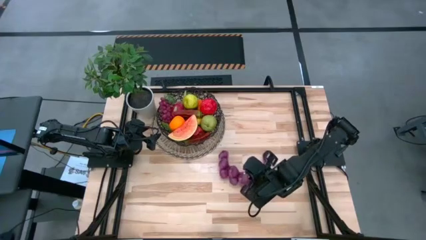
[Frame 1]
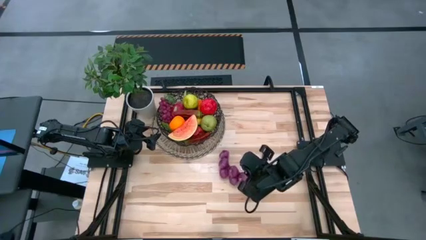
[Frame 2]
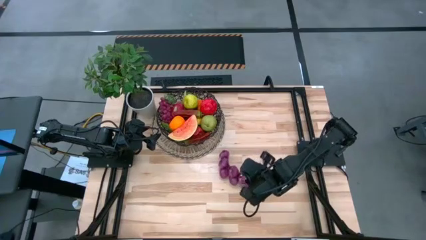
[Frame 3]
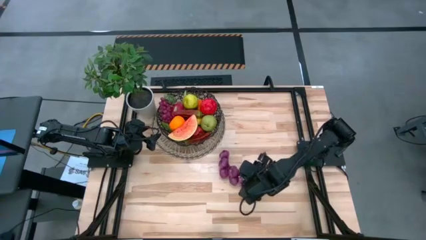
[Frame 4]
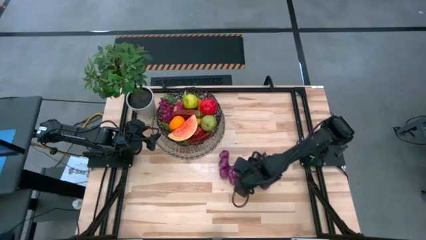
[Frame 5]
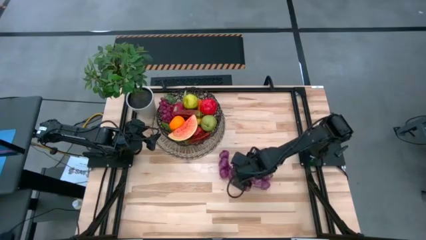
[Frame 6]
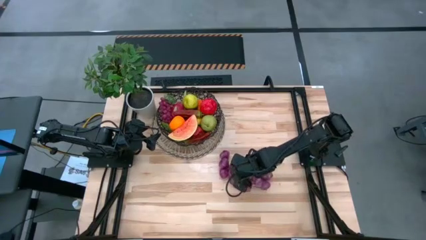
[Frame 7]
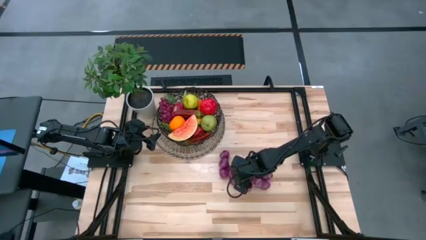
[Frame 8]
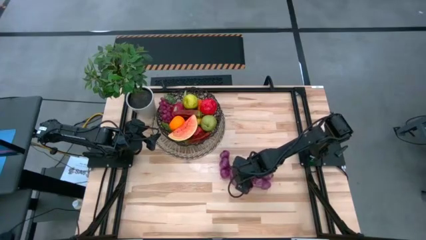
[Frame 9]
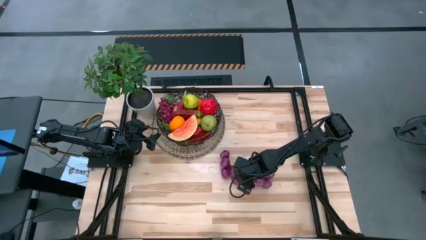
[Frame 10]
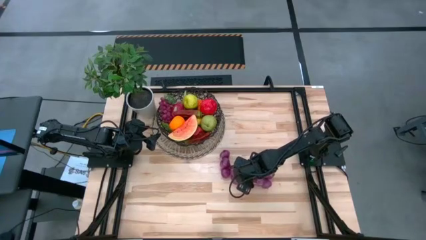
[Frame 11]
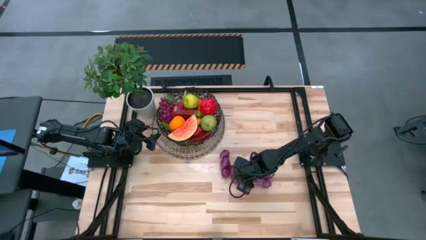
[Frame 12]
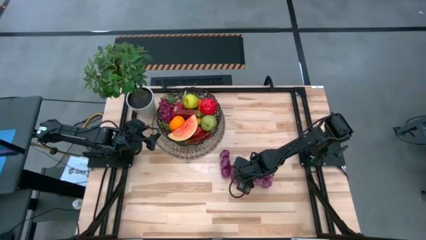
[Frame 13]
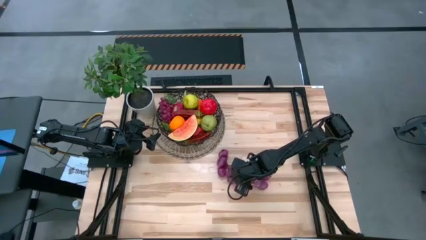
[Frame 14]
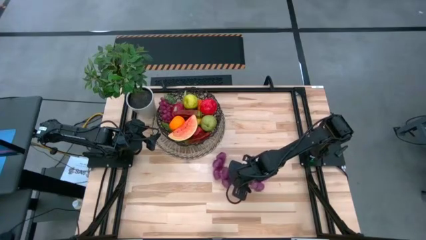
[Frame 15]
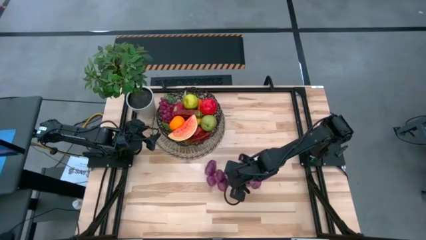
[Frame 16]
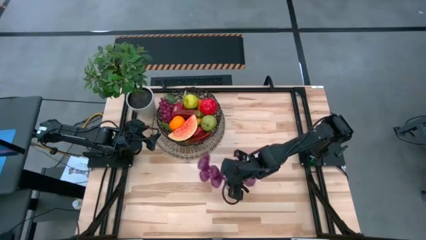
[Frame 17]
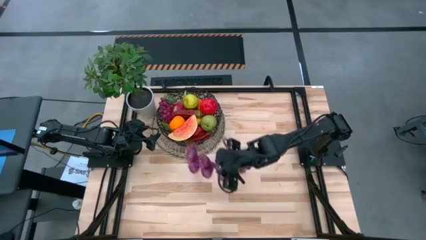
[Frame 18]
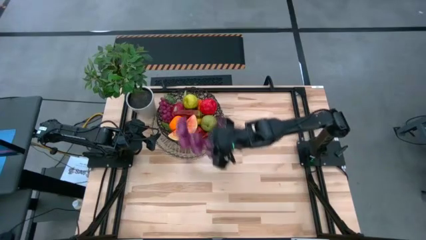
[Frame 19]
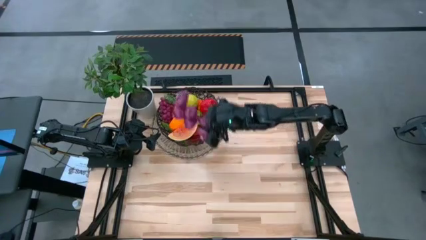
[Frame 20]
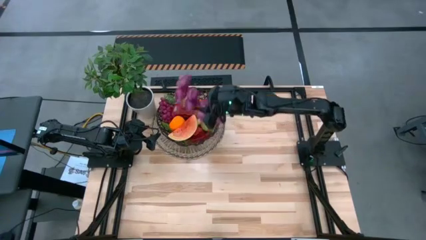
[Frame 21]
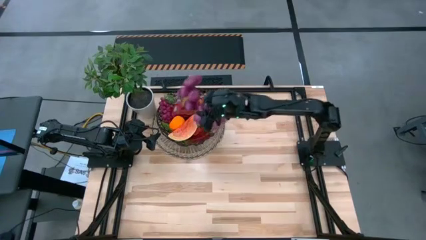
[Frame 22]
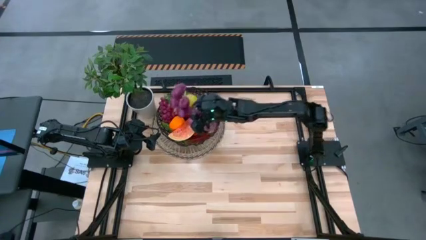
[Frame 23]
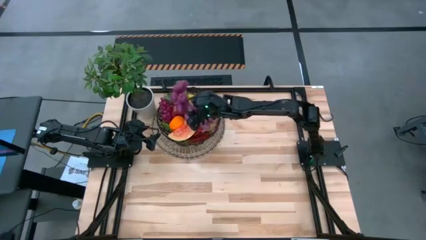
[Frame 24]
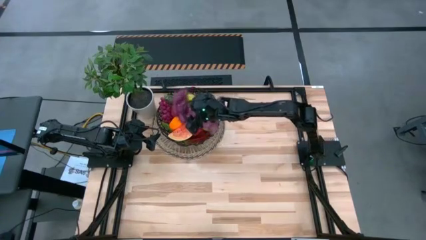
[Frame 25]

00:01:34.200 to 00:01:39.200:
Task: Build produce basket
Put the purple garlic into the wire basket

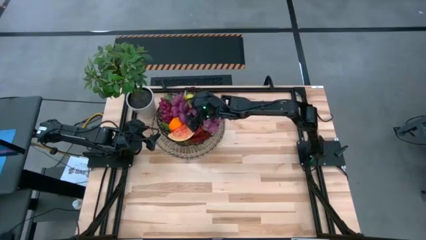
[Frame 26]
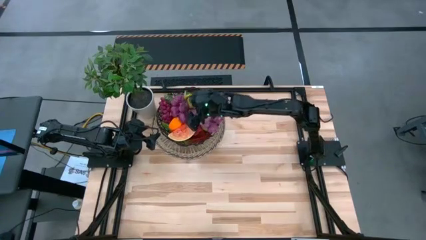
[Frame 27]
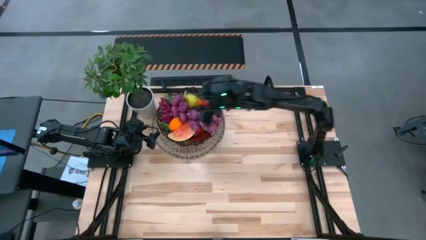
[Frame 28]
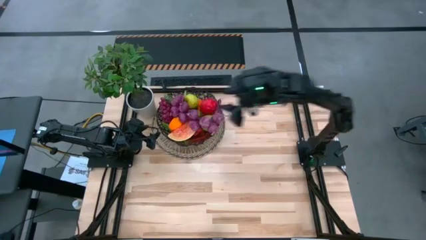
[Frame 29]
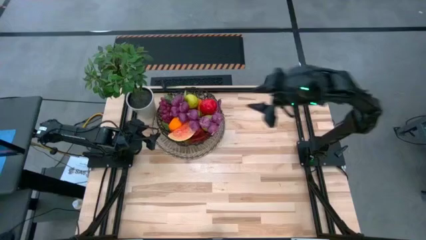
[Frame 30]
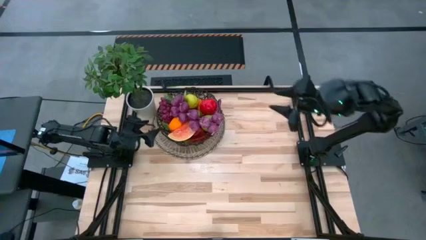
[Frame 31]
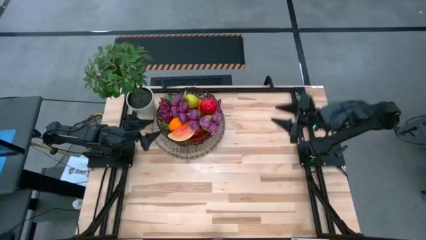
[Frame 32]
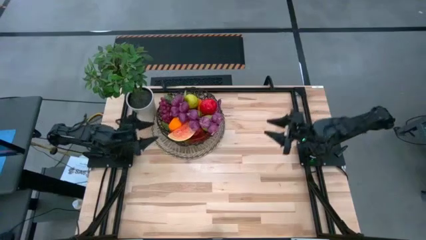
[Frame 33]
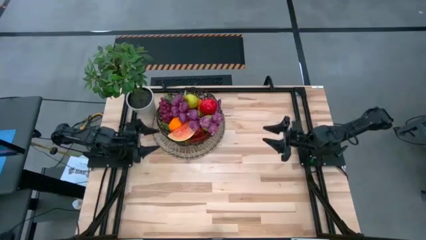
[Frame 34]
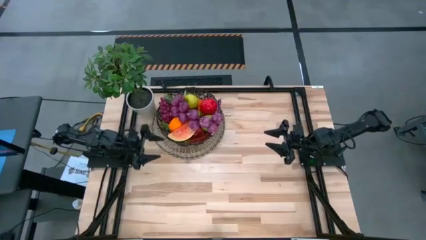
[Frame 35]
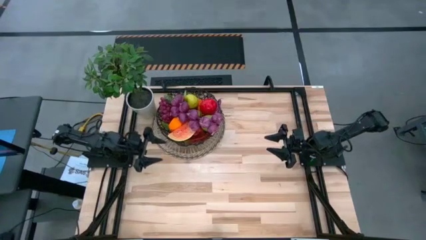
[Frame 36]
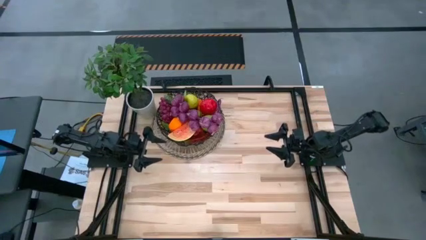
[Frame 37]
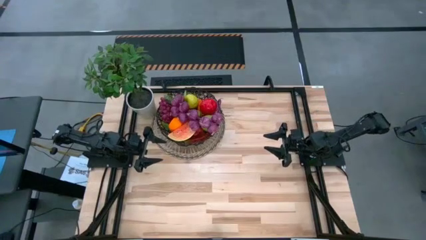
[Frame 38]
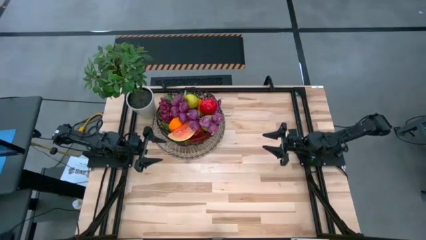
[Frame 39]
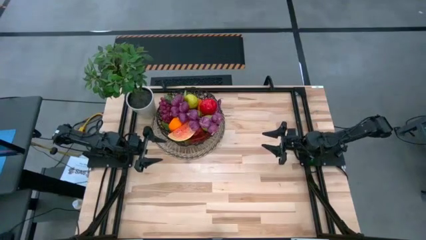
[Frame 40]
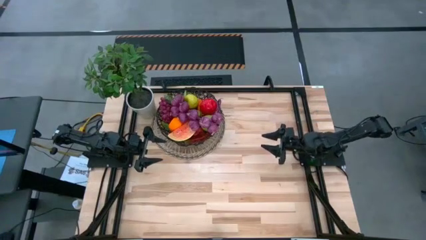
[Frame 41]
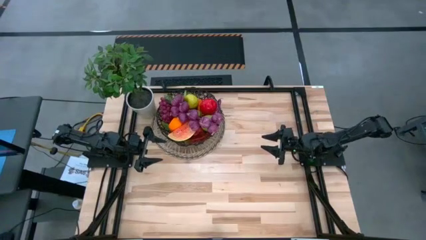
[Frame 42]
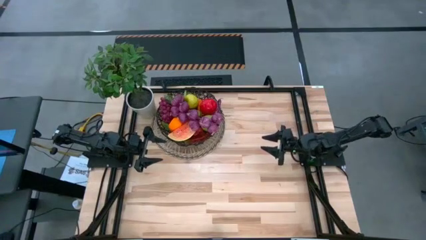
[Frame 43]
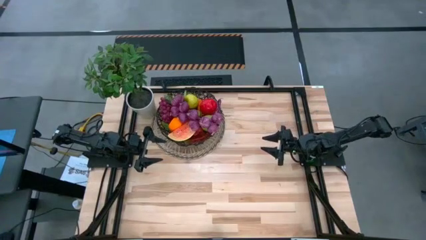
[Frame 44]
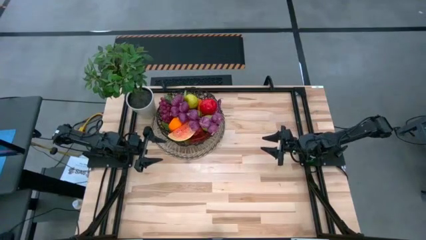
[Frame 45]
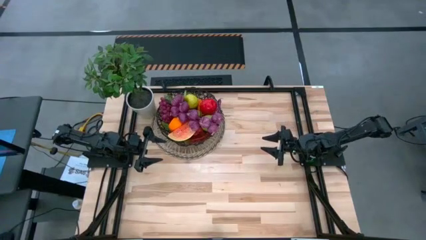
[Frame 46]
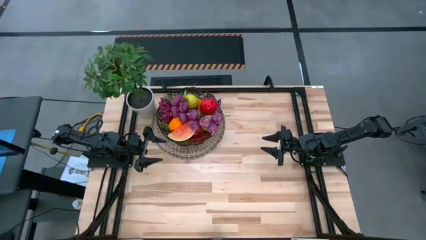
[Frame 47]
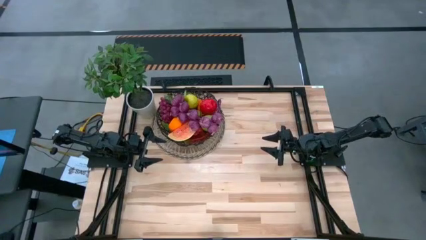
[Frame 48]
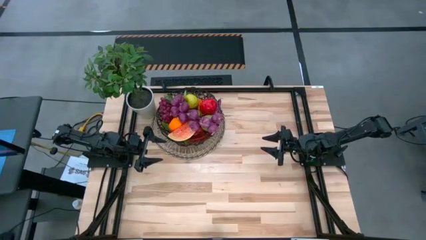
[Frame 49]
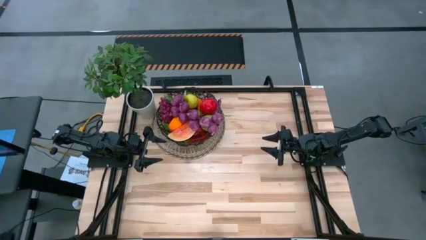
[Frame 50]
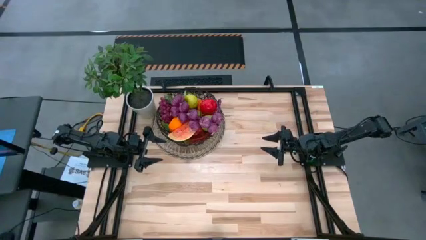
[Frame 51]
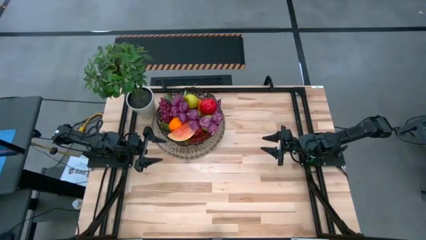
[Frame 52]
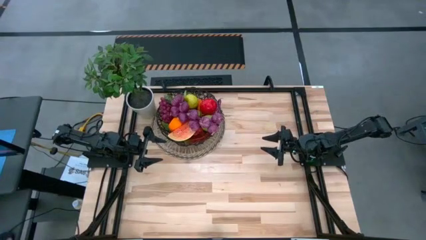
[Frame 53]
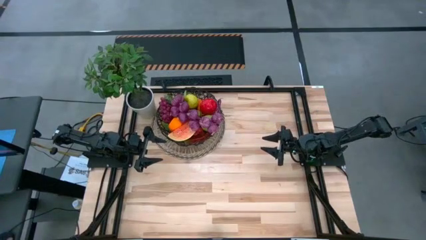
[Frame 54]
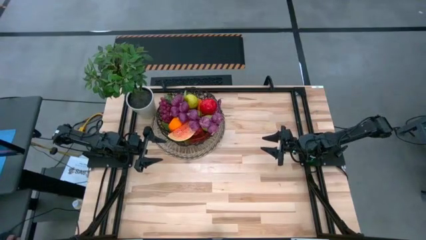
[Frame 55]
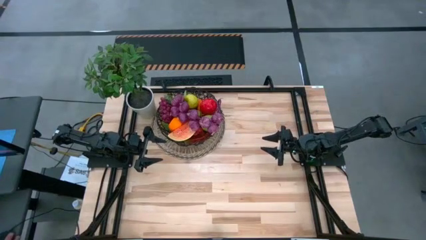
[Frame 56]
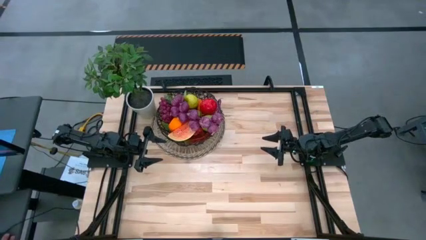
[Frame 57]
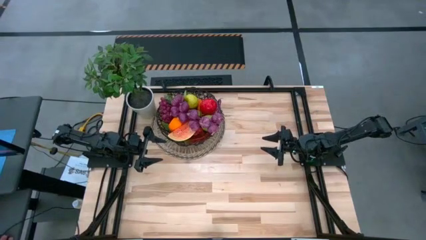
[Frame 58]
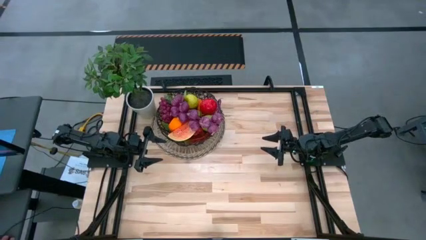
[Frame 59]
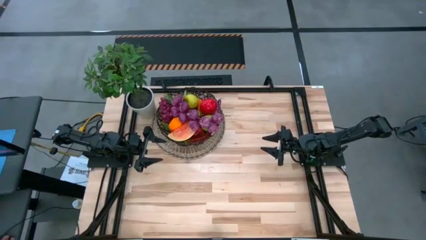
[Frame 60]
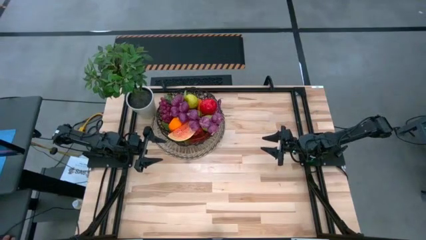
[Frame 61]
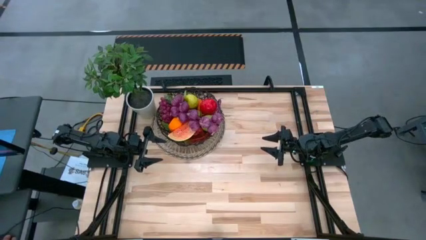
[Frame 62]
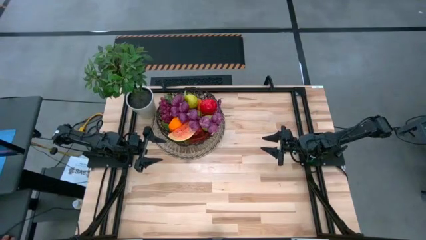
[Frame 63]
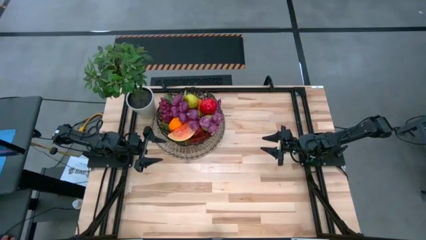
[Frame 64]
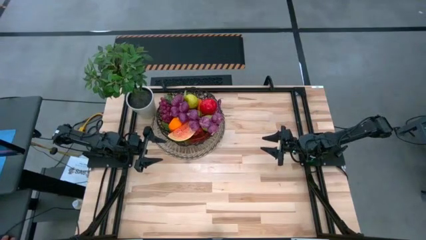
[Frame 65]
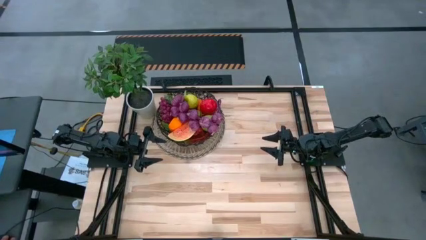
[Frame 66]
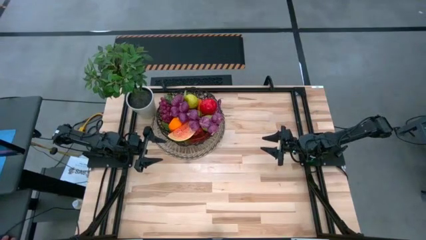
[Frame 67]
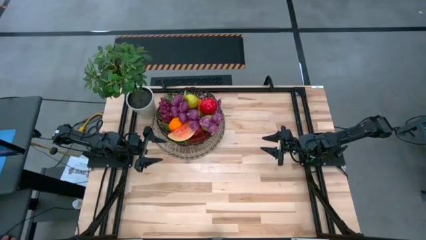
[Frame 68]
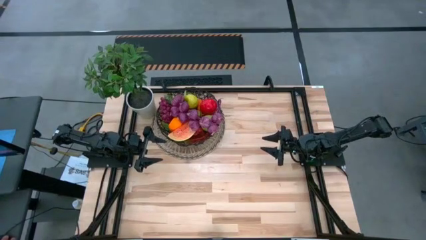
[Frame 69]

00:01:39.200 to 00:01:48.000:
Return to Home Position

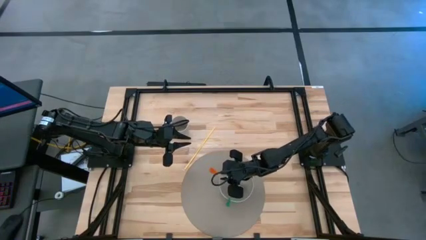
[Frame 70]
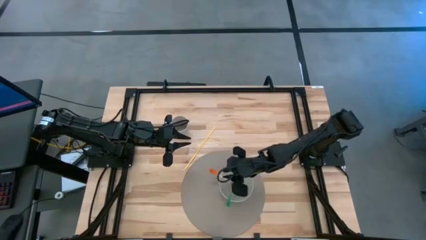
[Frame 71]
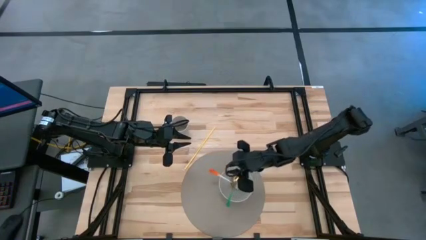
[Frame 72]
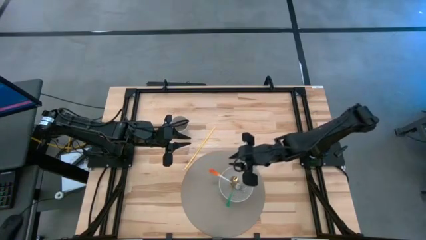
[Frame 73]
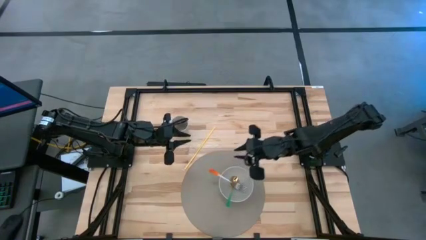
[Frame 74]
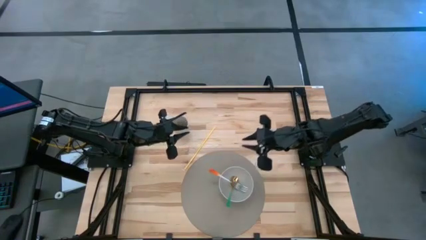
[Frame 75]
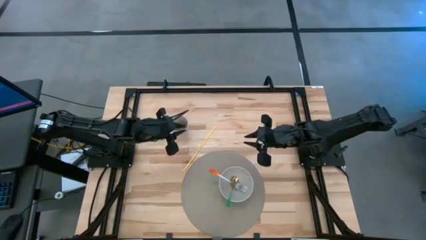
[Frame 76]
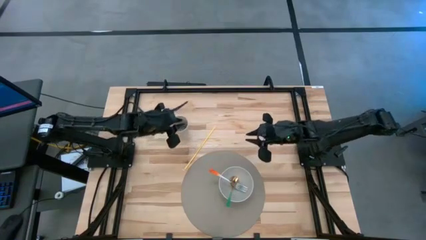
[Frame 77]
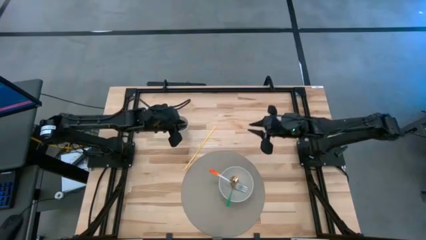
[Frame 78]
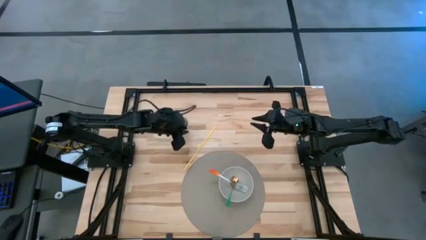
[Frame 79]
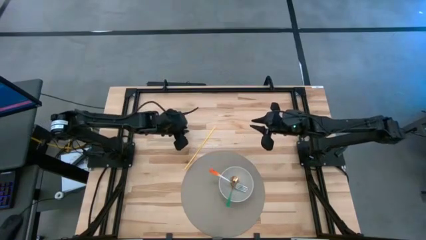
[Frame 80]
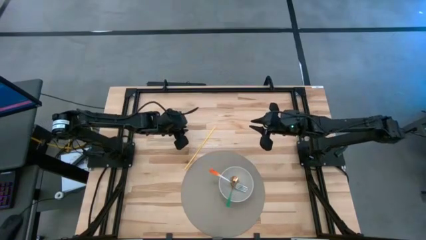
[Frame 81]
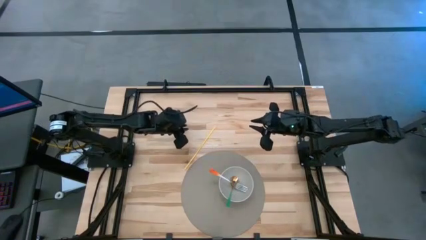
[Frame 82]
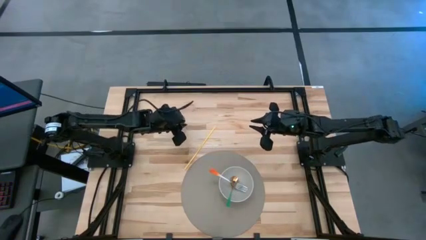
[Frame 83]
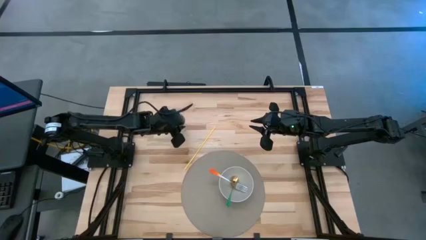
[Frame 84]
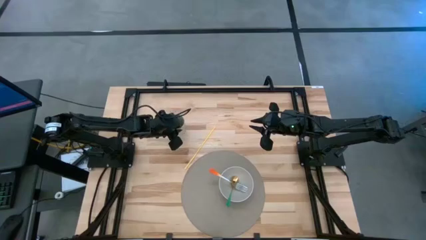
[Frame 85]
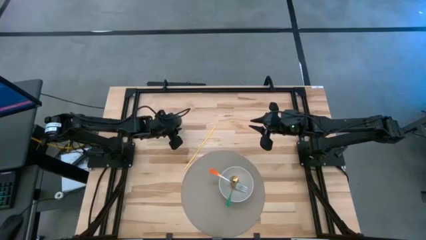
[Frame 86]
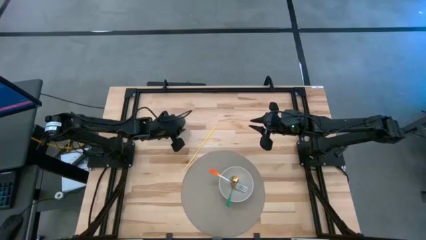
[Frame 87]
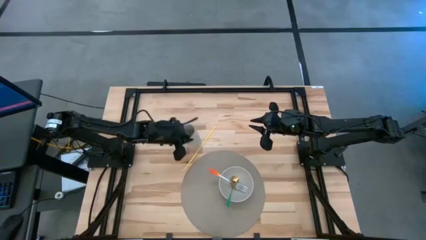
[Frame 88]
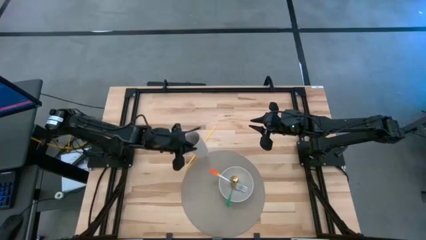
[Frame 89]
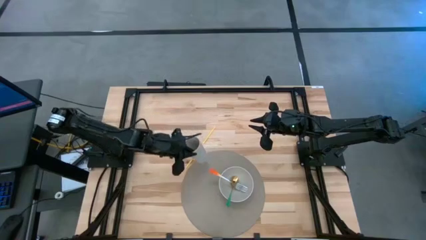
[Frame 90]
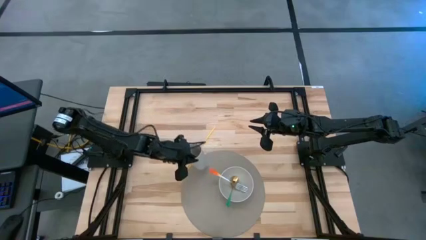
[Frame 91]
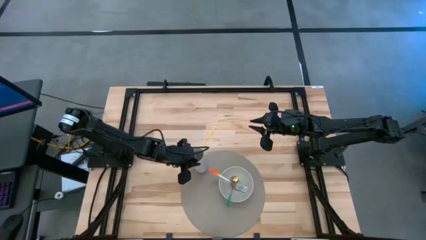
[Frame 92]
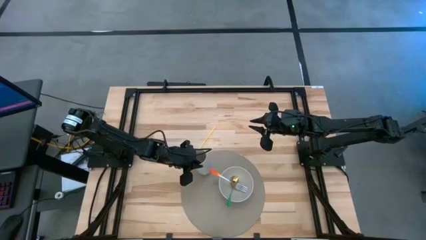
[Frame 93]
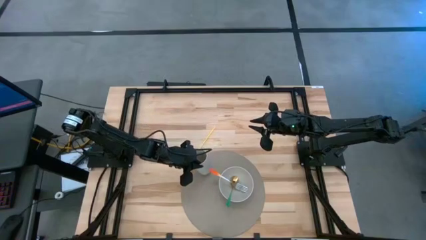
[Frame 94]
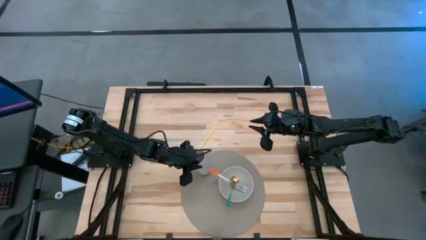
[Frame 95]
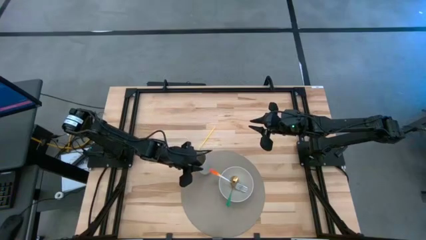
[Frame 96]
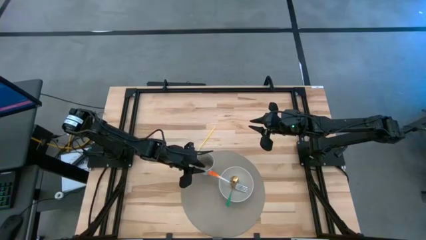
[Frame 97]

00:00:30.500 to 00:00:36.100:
Task: Pick & Place Utensil
Put the white cup to the left side of the bowl on the placemat
